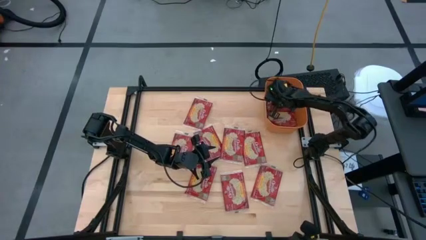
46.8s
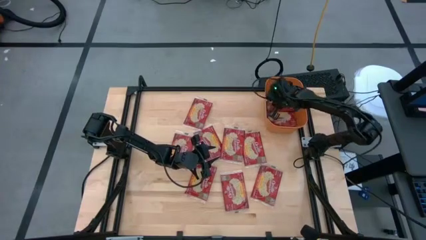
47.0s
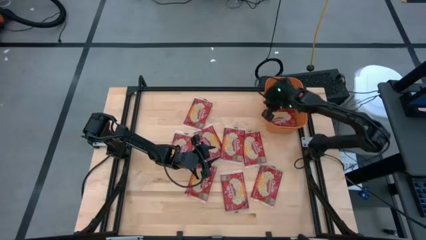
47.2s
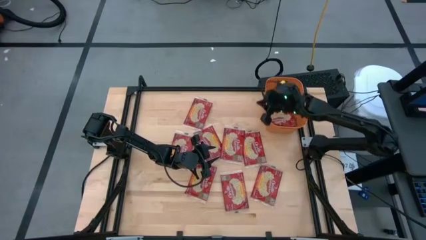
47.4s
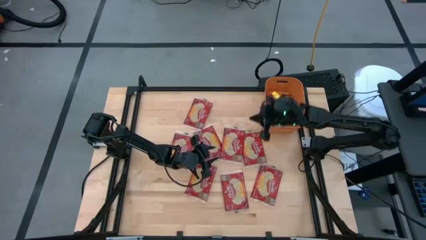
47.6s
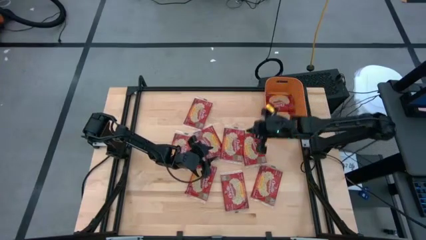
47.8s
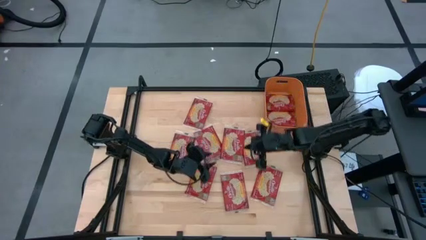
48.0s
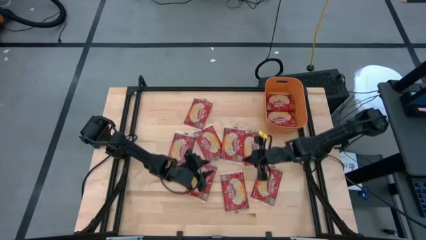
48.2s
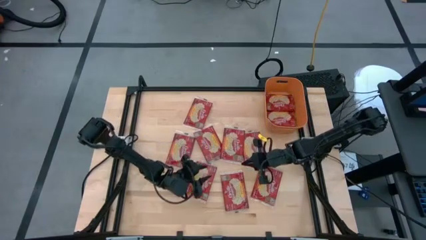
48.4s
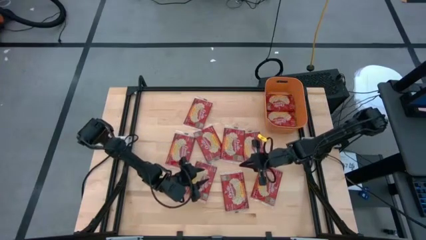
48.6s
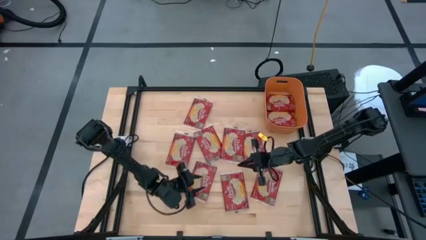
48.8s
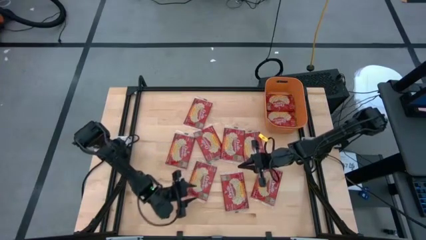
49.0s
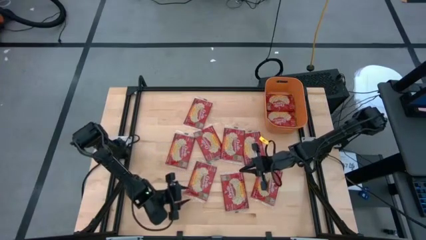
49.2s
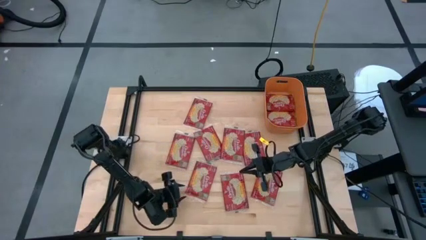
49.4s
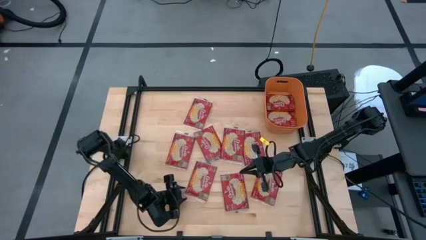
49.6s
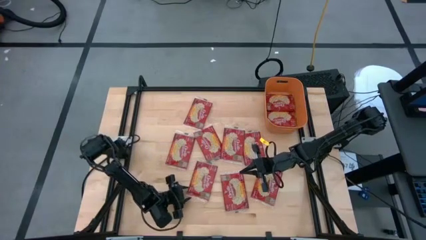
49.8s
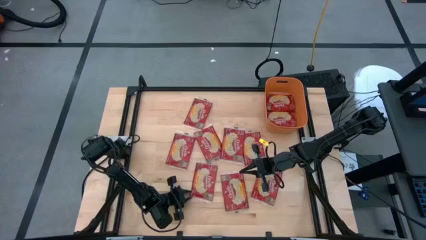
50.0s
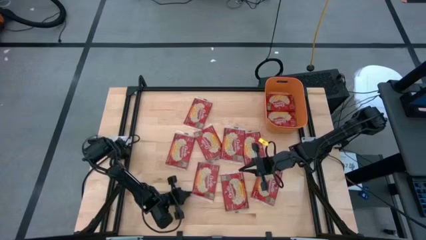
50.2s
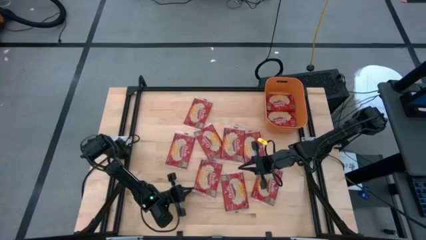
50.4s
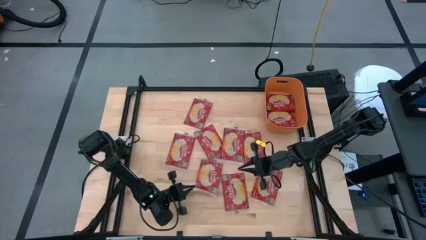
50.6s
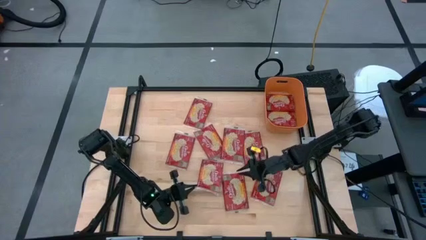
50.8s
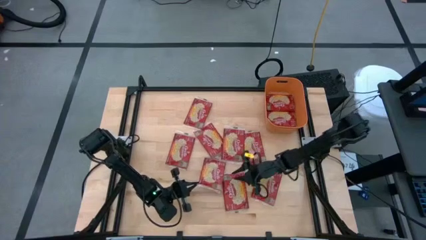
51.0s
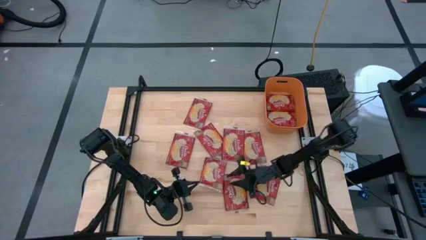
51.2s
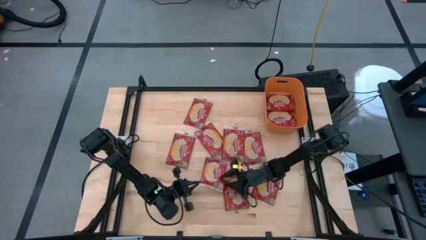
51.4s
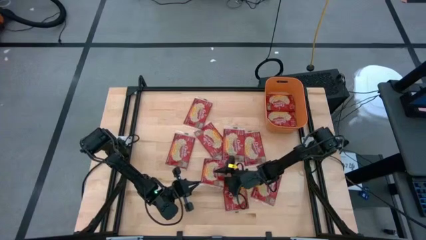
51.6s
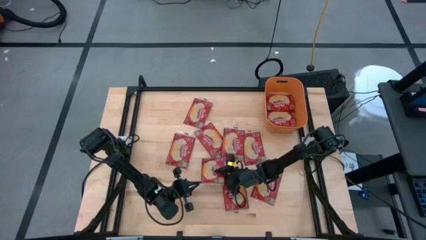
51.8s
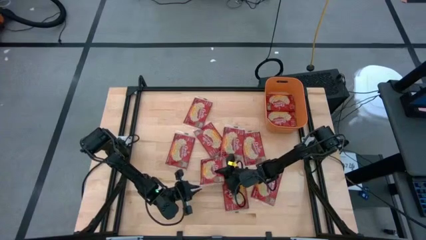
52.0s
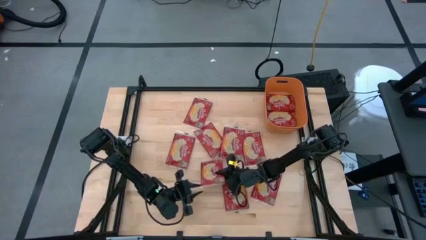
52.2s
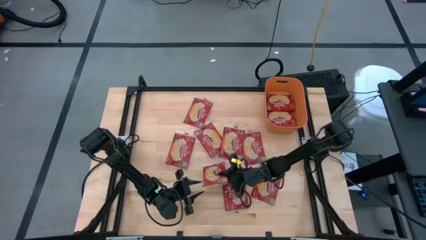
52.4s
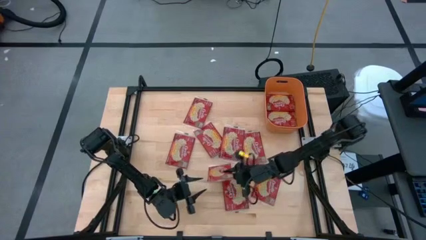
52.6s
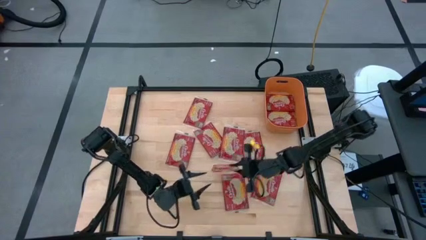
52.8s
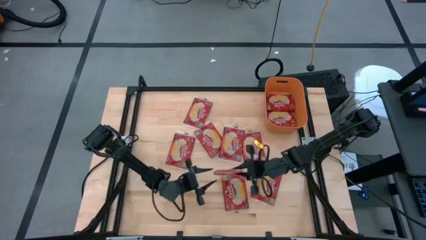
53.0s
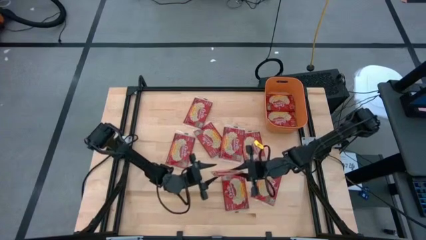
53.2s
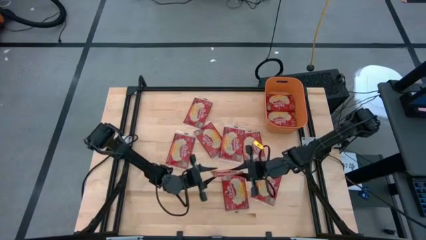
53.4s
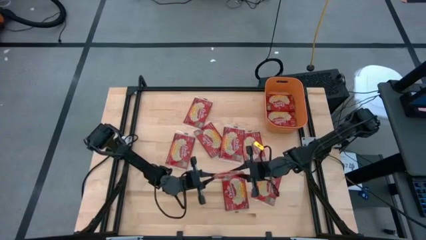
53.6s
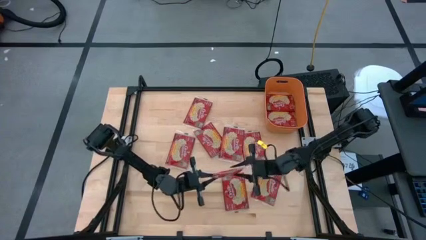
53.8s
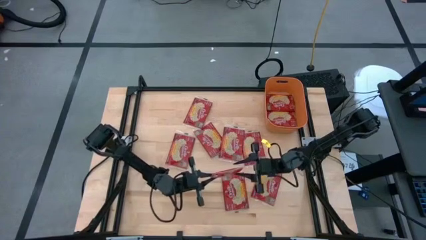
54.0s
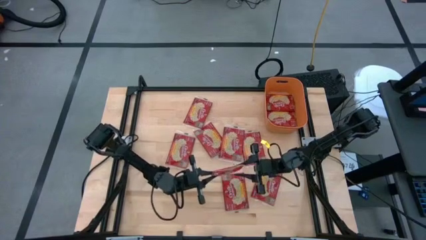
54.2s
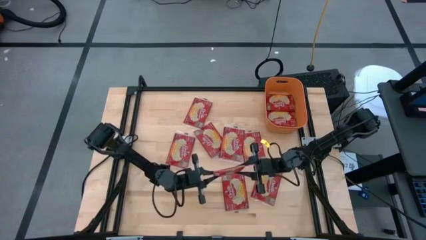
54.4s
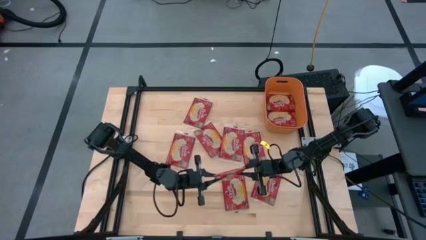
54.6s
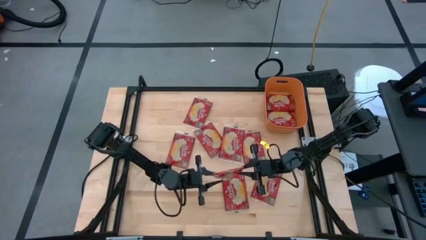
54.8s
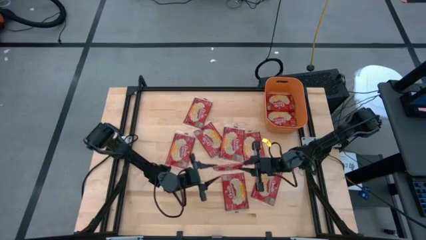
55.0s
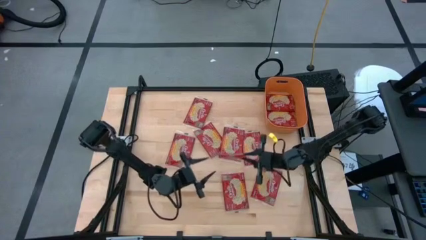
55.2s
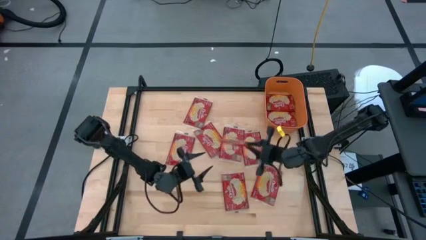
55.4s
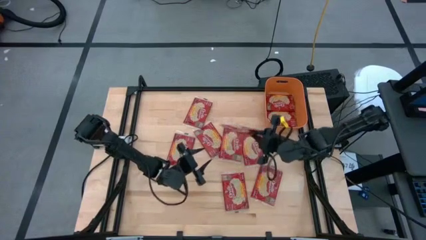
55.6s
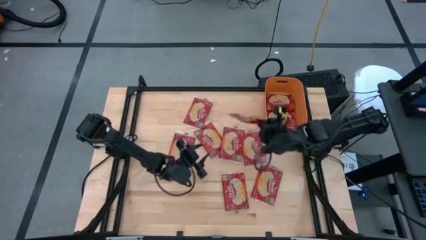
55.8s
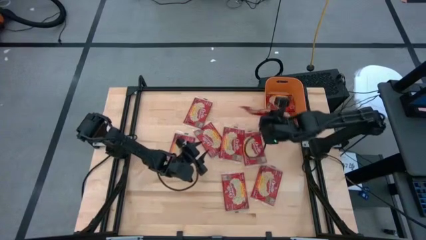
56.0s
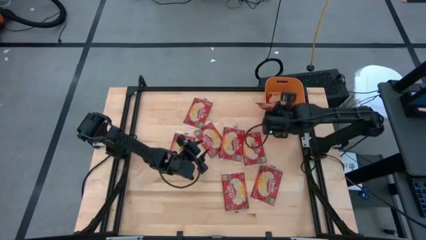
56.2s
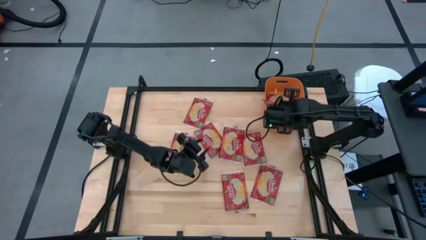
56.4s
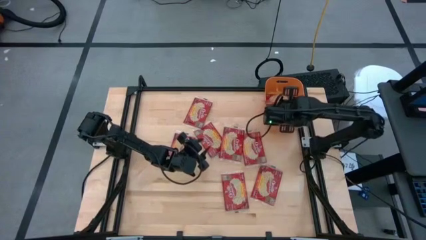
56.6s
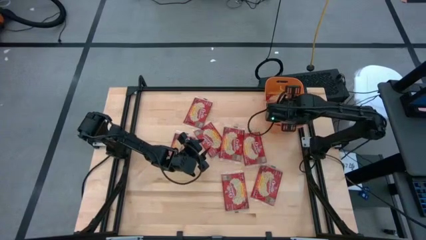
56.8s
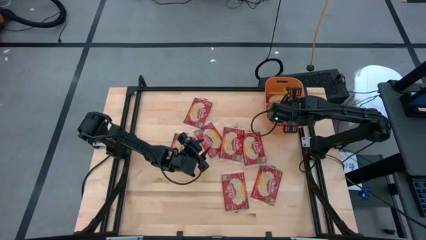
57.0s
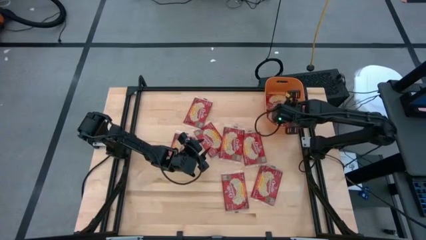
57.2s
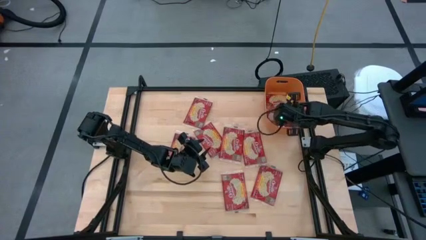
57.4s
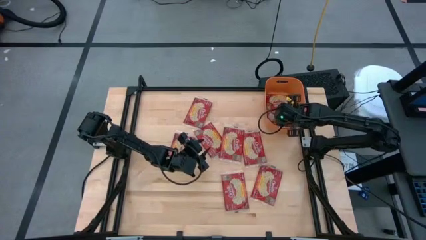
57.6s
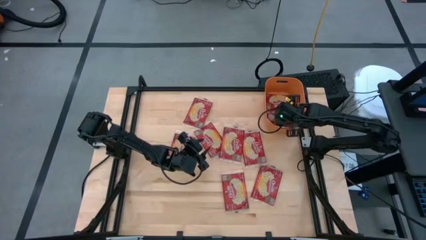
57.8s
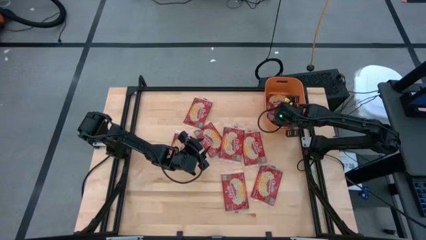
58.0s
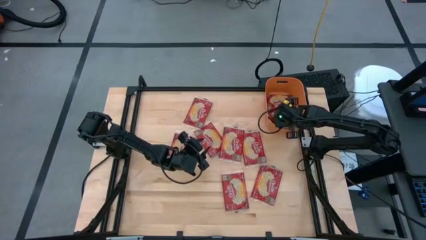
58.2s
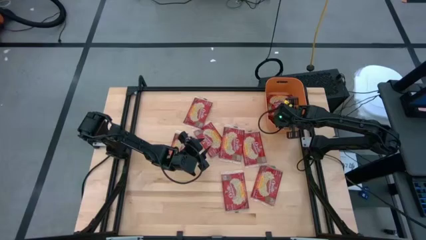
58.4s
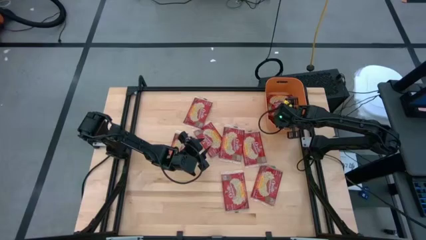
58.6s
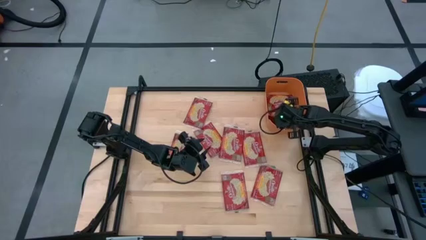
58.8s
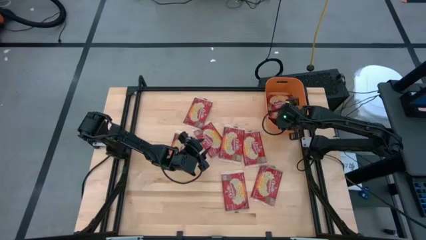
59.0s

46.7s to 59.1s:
Task: Sort popcorn bags into baskets
Put the red popcorn bag into the orange container

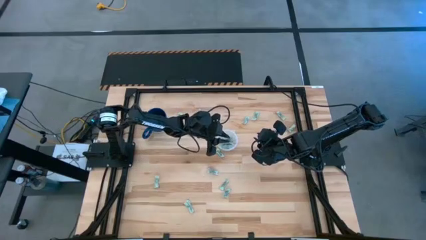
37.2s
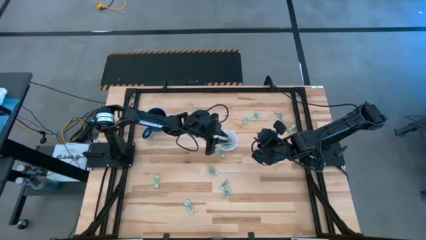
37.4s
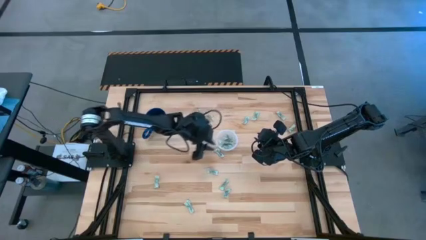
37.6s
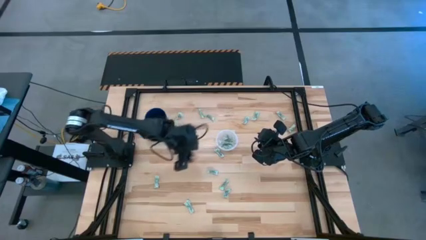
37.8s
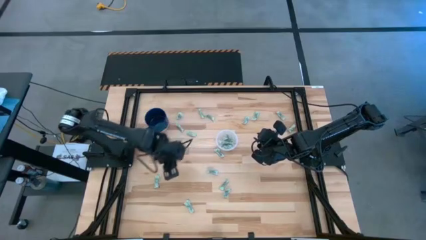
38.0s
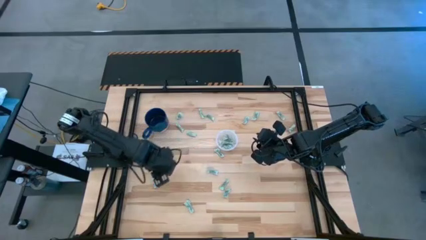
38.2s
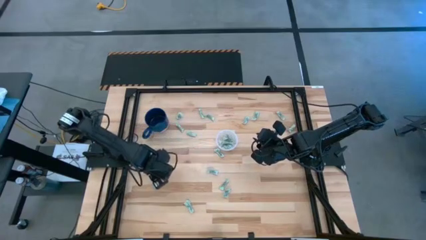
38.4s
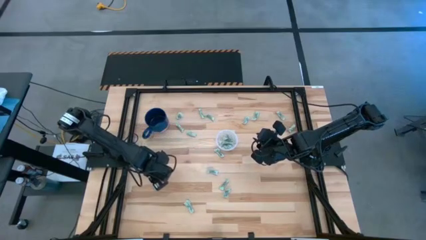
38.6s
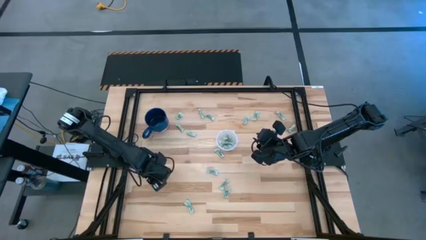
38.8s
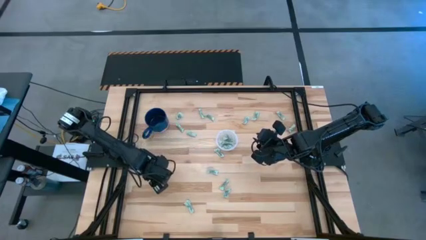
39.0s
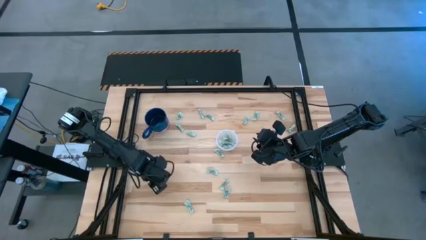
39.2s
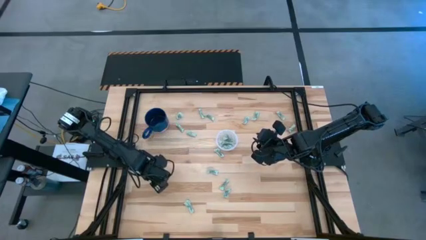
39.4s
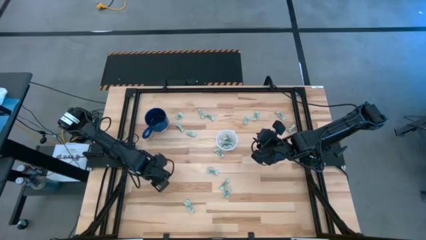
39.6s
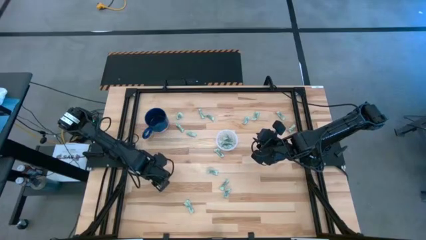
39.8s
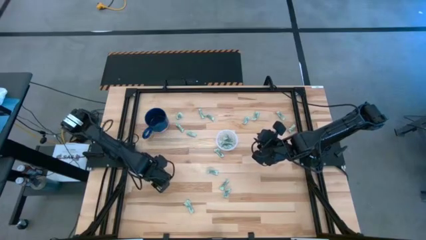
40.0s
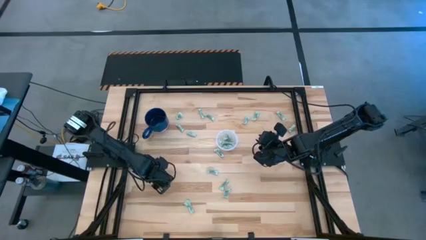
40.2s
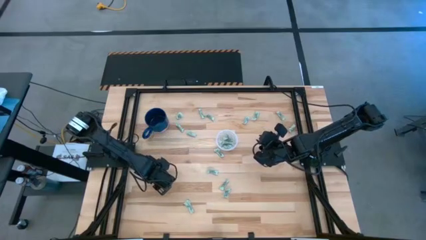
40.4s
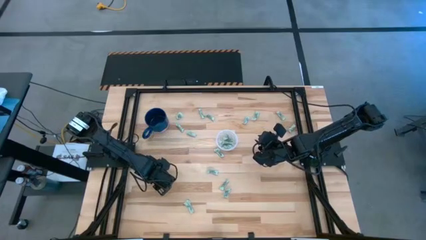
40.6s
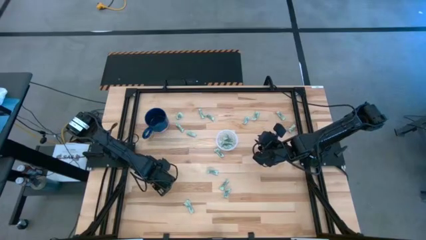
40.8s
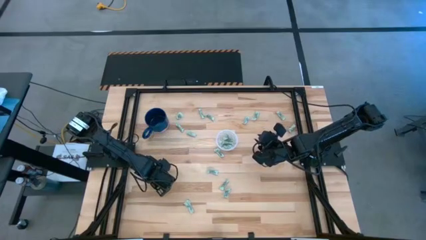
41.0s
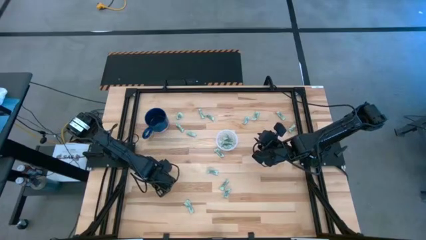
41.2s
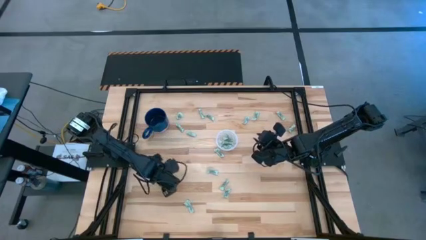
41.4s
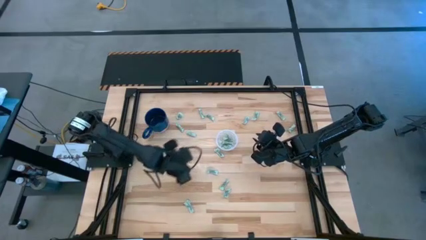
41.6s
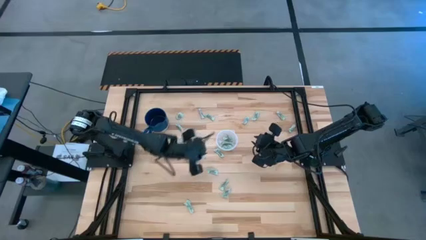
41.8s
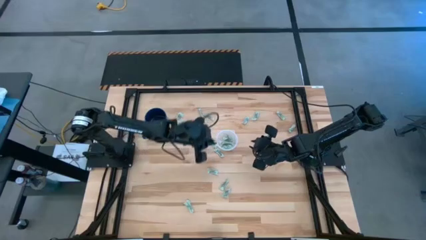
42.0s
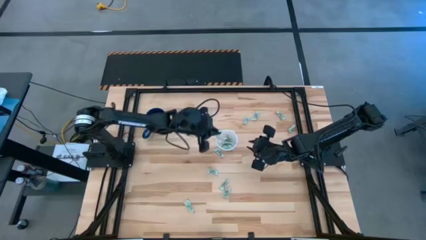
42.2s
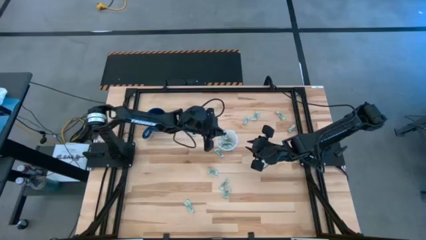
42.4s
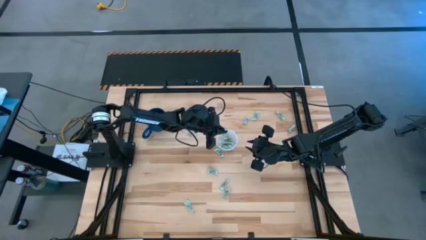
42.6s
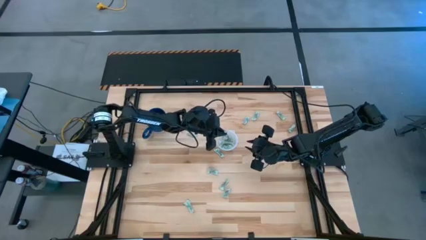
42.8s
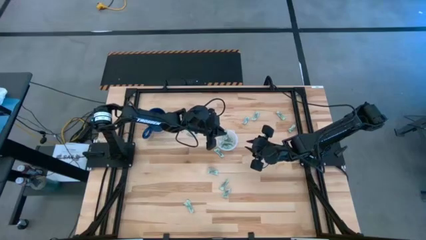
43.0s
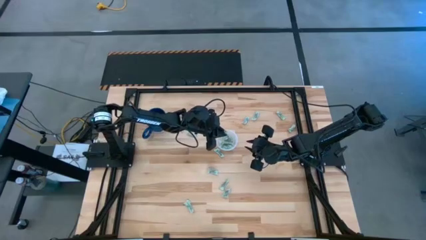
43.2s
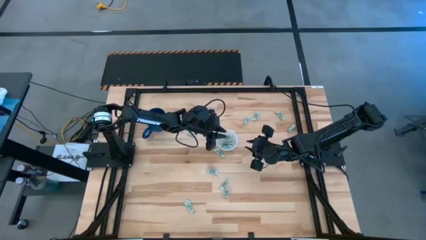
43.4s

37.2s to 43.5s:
Task: Pick and place items into bin
Put the gray stevia packet into the transparent bin
